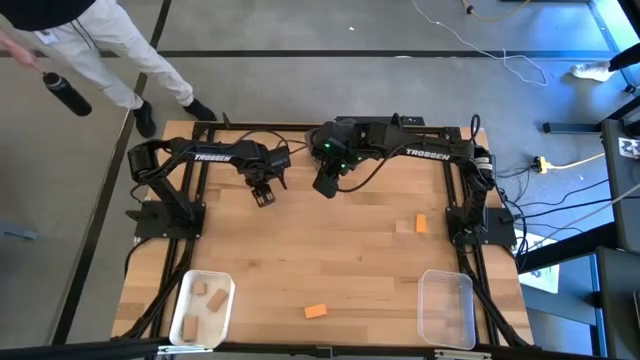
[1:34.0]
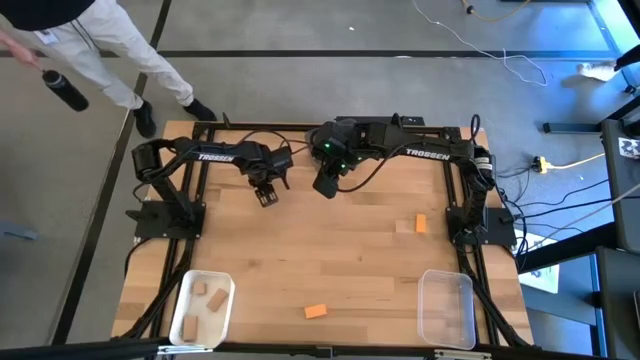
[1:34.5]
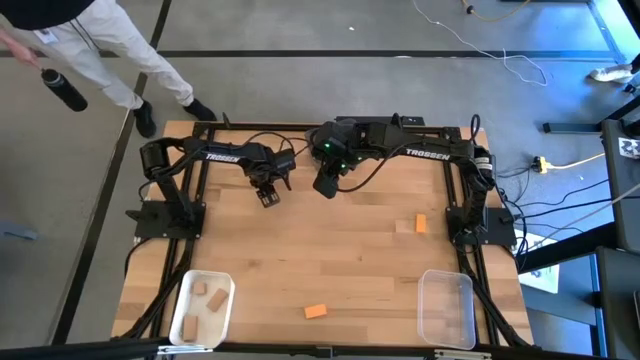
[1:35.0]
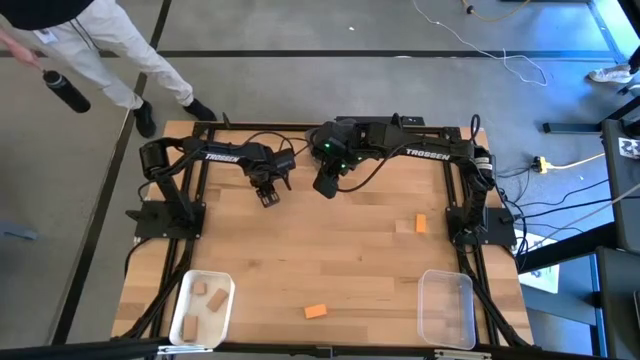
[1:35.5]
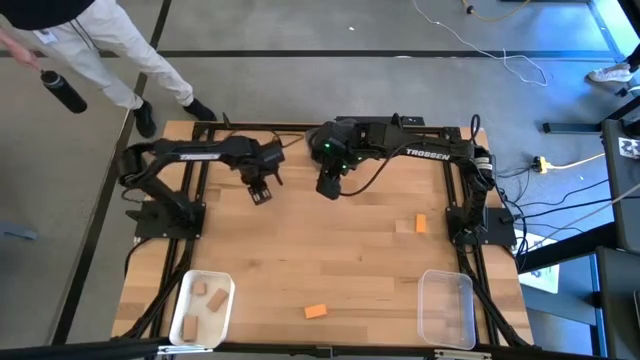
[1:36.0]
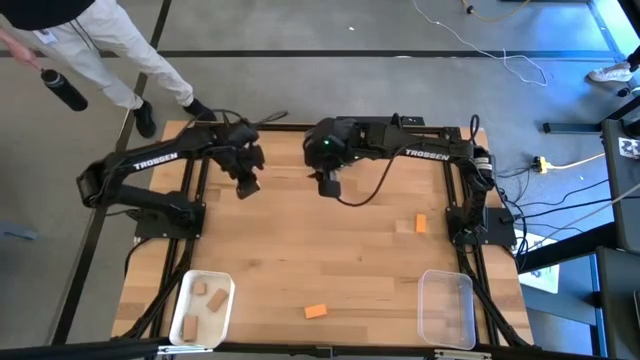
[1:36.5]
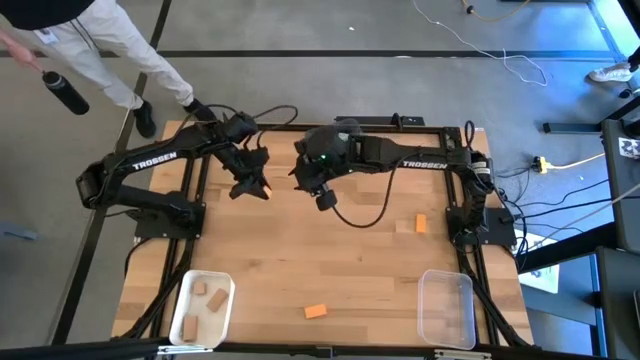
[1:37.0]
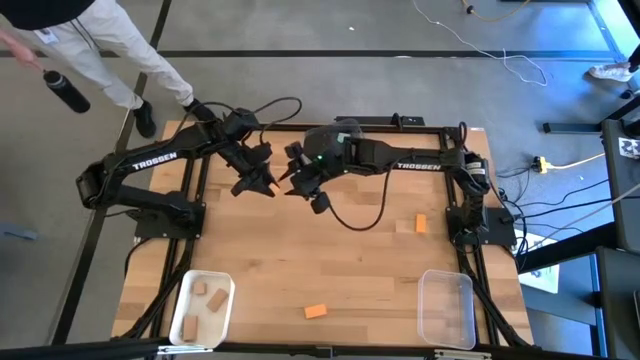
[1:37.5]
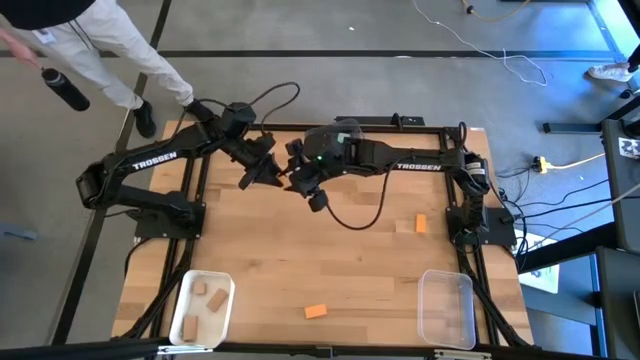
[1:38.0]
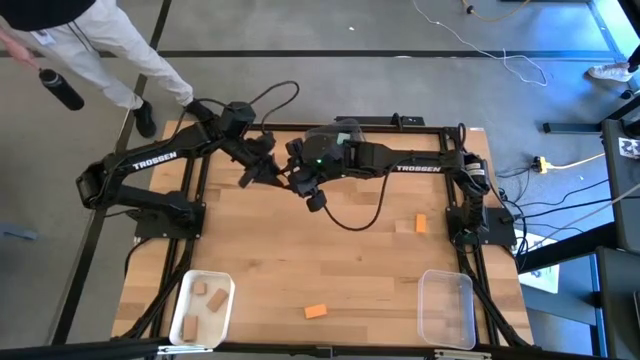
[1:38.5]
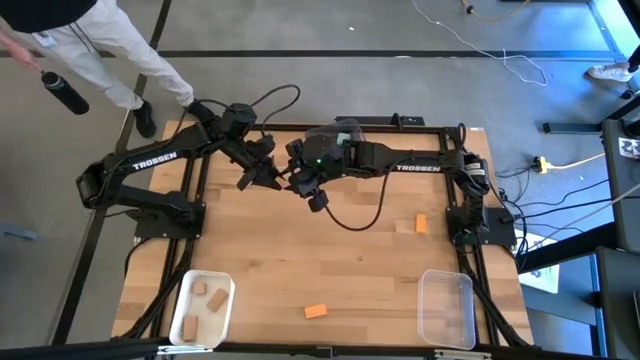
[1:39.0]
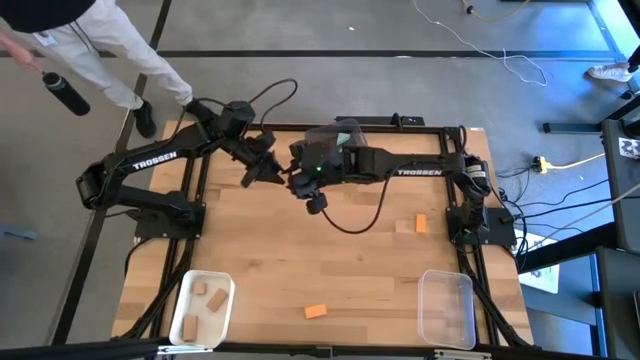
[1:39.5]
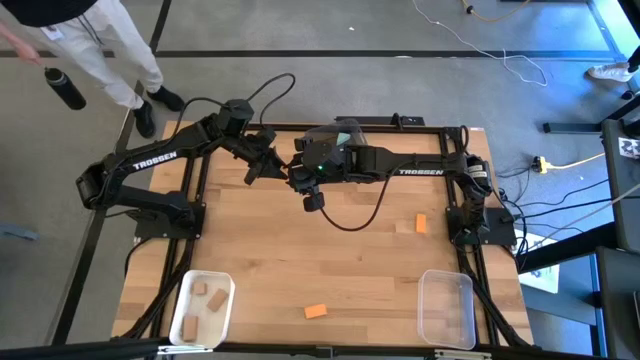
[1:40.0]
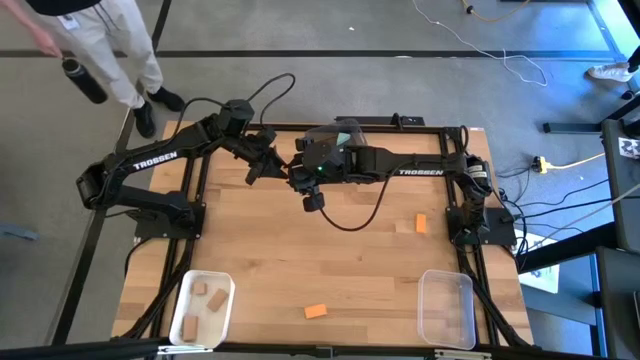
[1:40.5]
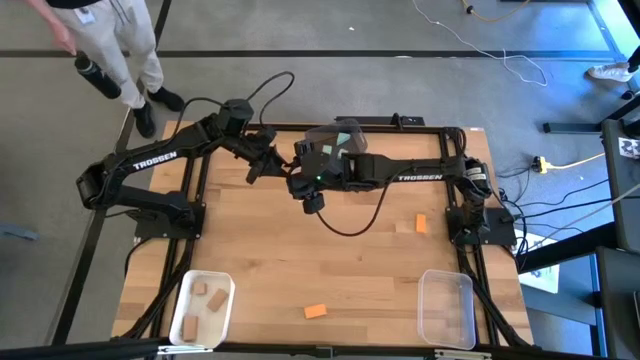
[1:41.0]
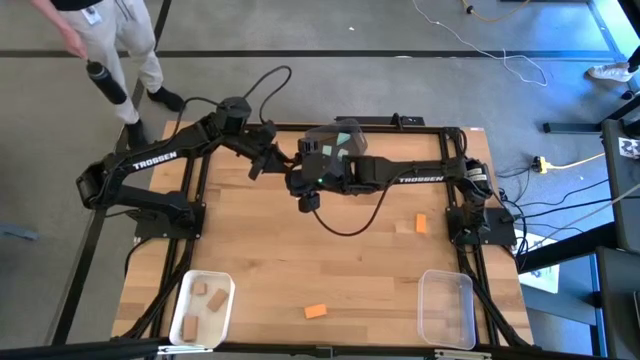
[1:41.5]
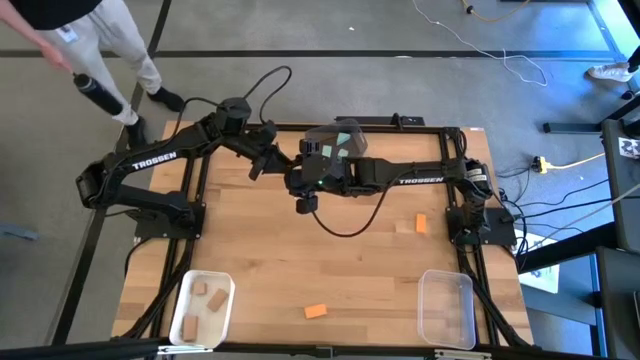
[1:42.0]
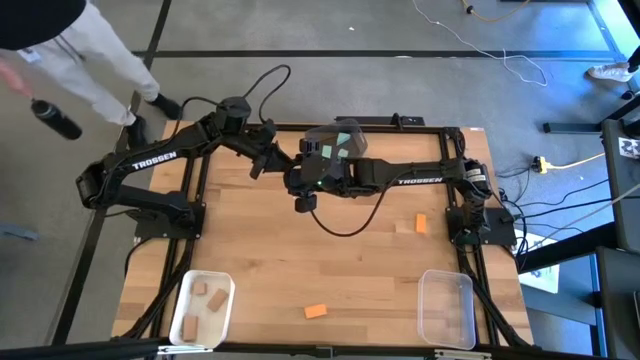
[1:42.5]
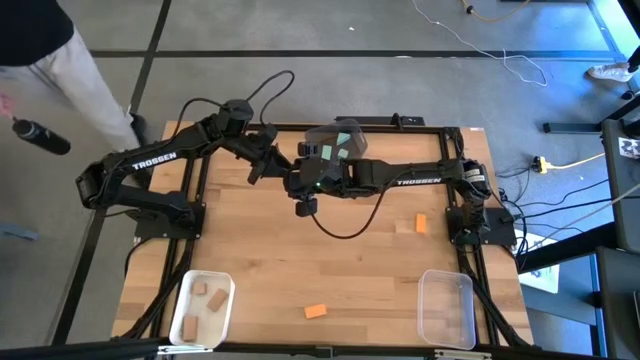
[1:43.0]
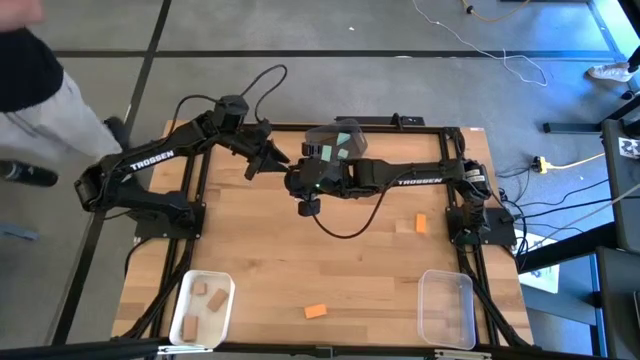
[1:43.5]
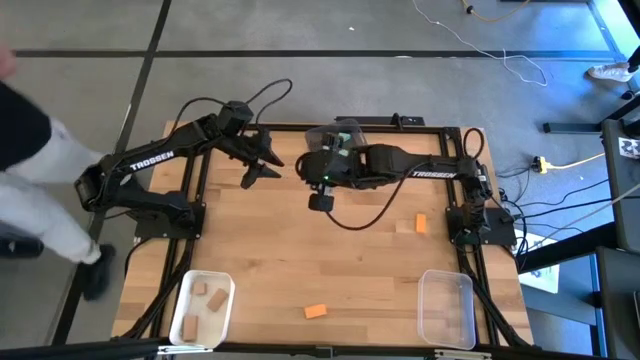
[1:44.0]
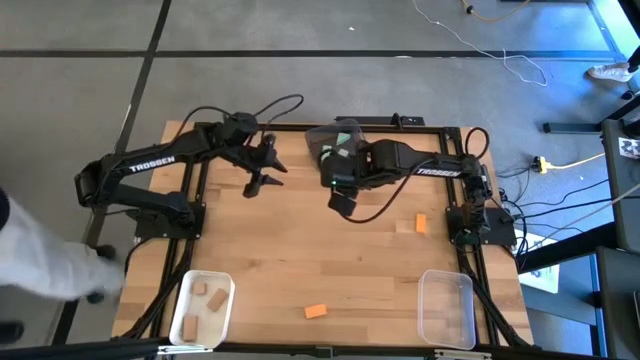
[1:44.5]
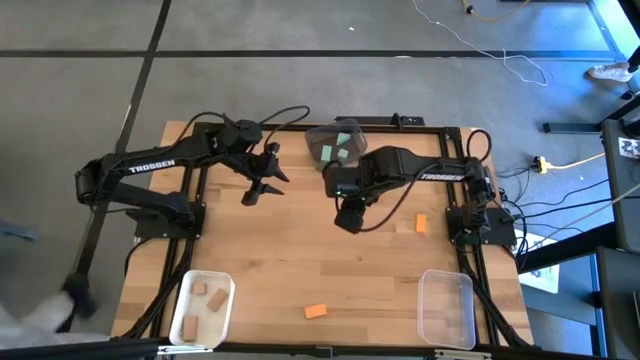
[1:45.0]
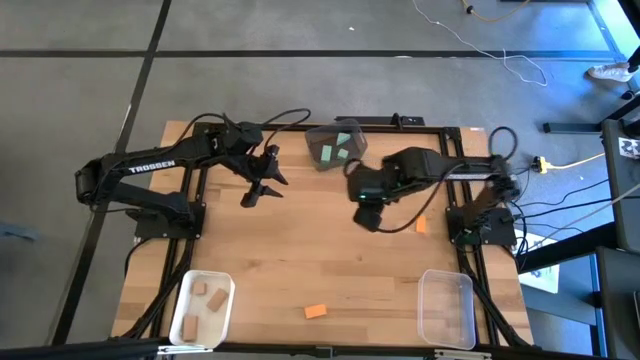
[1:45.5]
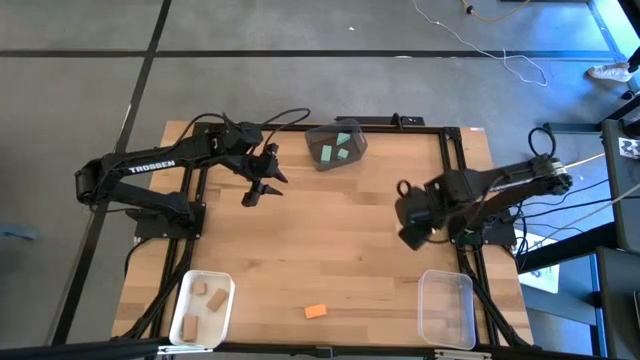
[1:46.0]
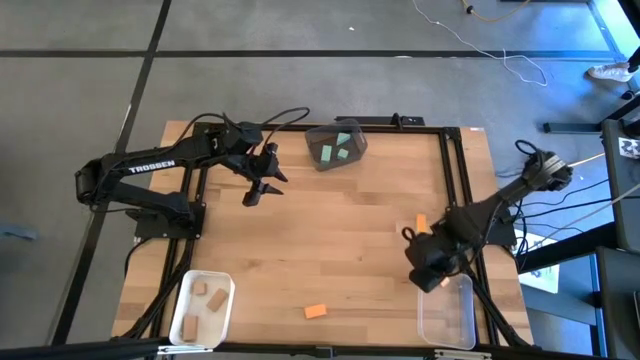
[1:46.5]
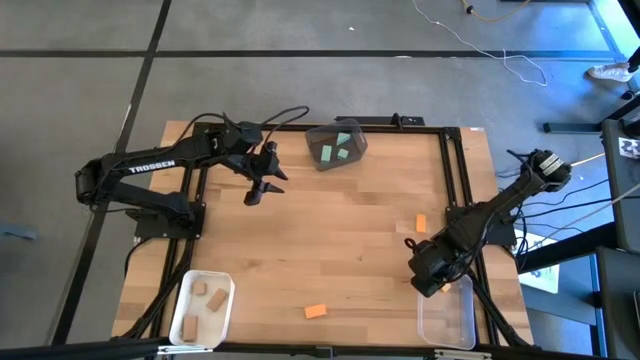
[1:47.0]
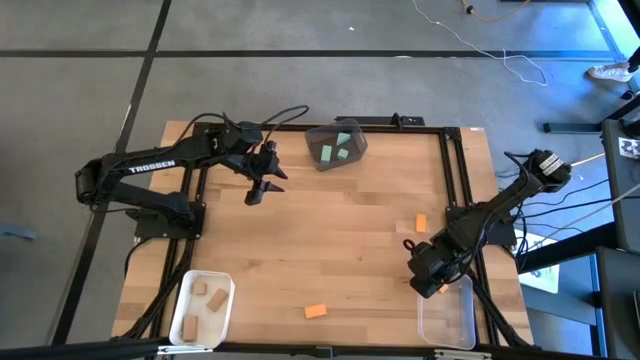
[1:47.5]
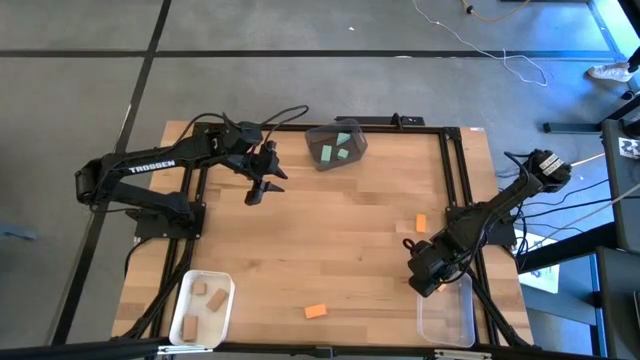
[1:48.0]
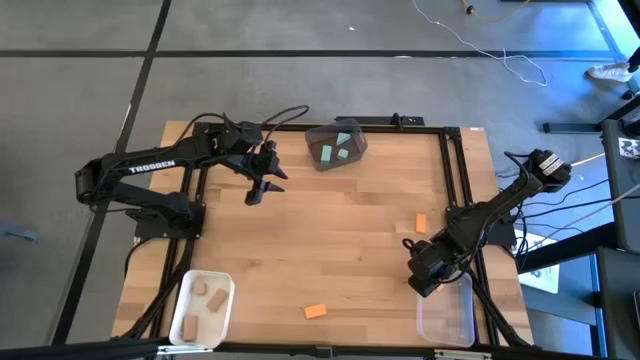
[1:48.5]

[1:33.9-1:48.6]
Task: Sort & place blocks by color
Put the top orange block into the transparent bin
